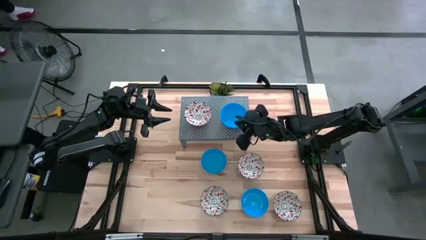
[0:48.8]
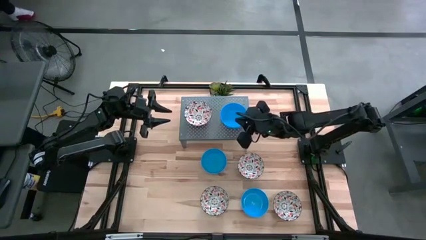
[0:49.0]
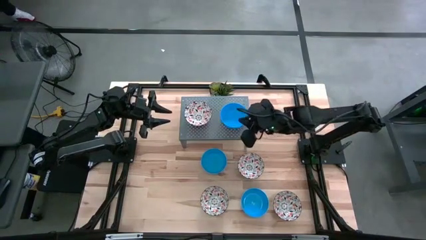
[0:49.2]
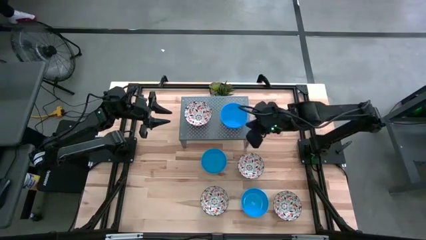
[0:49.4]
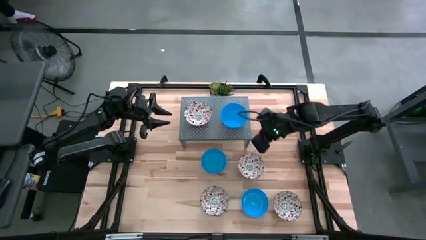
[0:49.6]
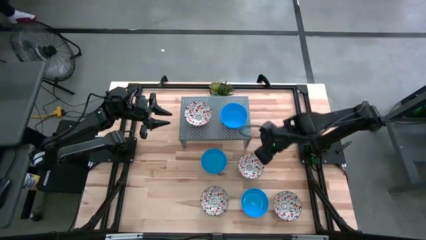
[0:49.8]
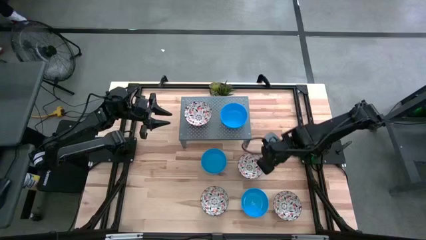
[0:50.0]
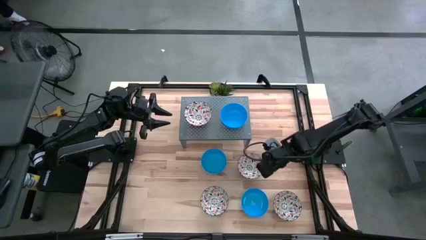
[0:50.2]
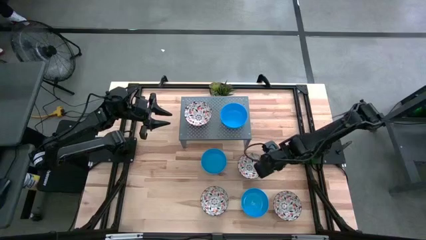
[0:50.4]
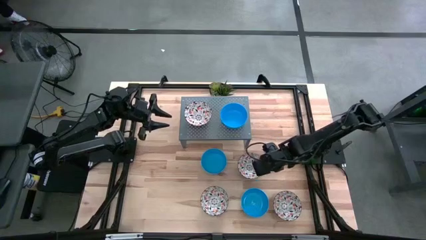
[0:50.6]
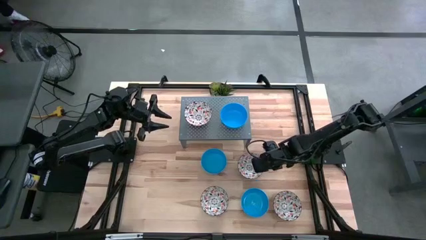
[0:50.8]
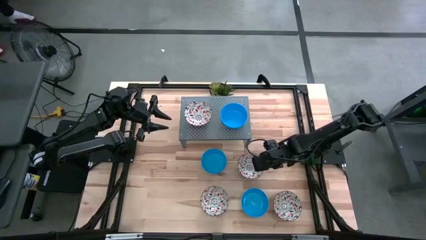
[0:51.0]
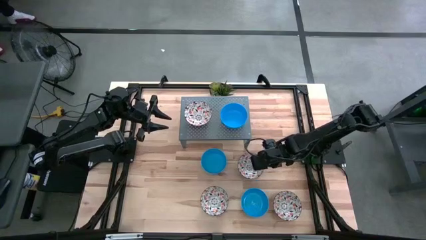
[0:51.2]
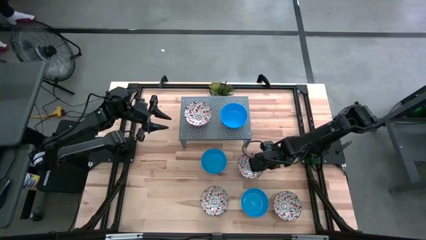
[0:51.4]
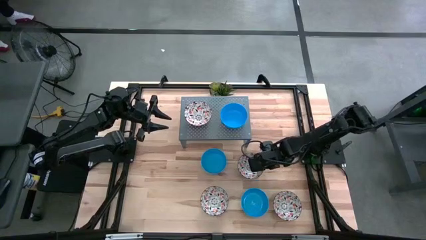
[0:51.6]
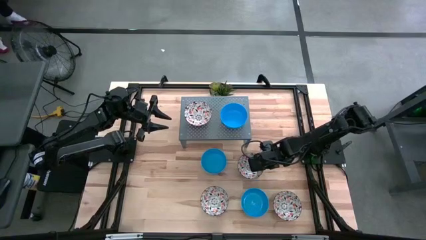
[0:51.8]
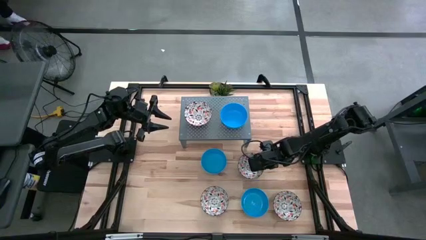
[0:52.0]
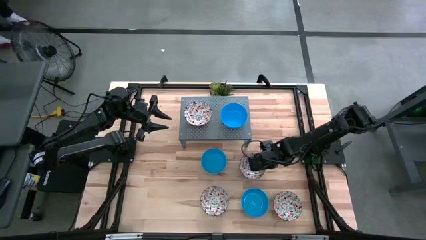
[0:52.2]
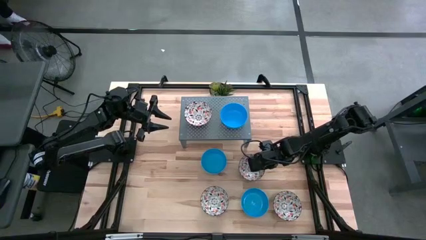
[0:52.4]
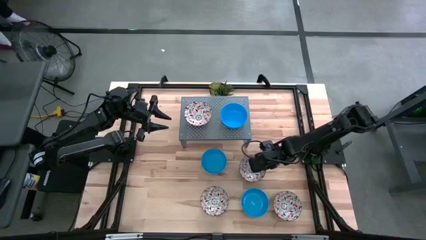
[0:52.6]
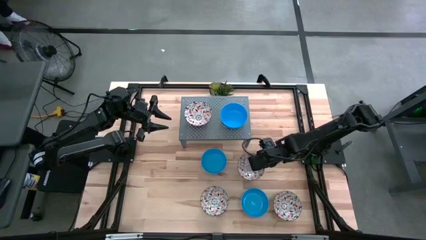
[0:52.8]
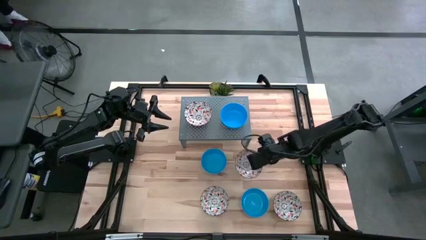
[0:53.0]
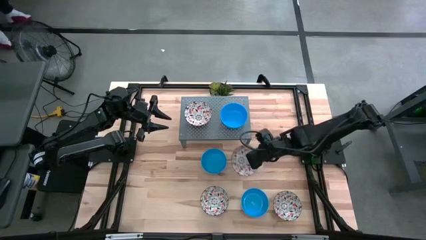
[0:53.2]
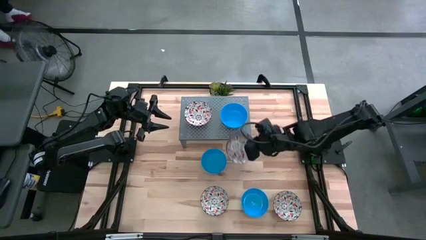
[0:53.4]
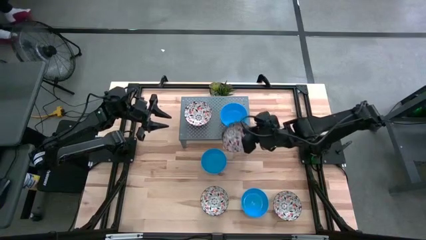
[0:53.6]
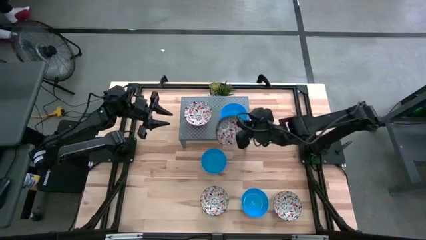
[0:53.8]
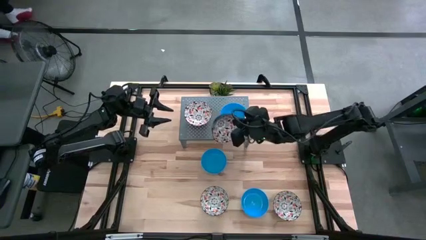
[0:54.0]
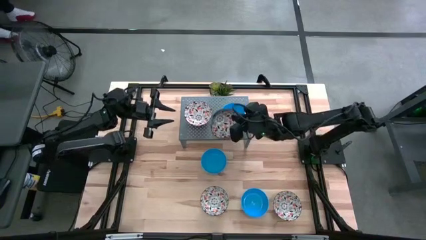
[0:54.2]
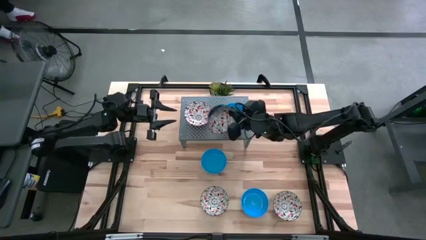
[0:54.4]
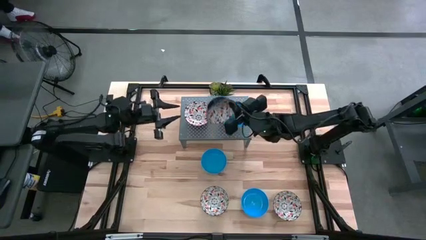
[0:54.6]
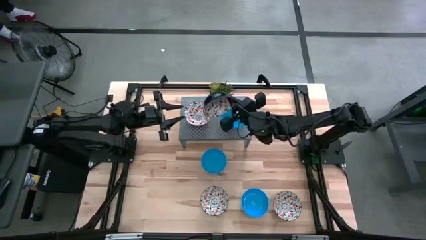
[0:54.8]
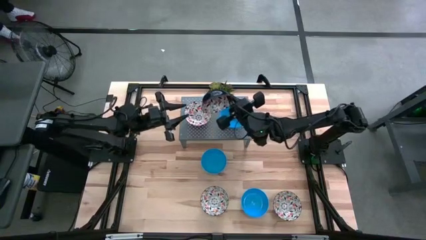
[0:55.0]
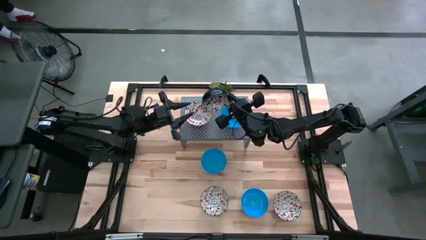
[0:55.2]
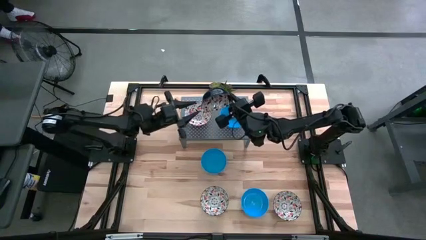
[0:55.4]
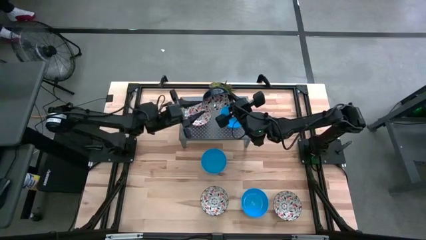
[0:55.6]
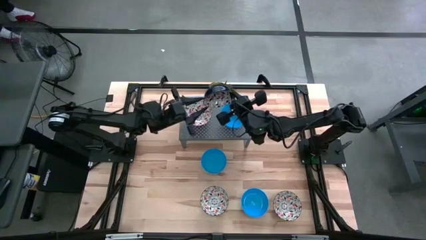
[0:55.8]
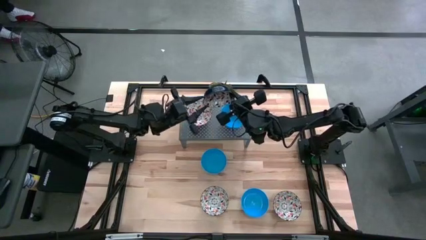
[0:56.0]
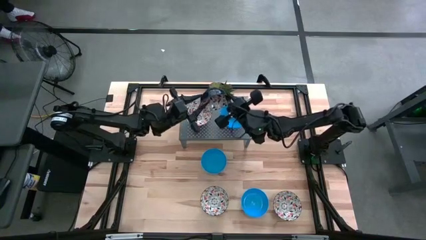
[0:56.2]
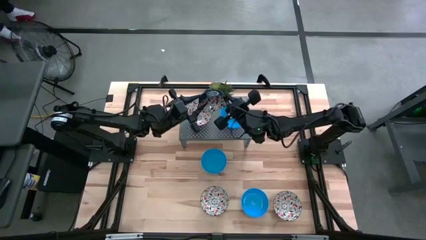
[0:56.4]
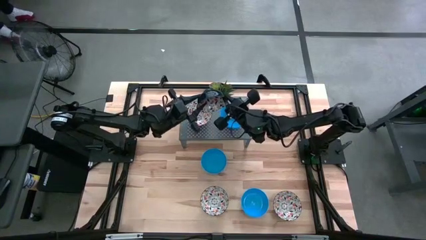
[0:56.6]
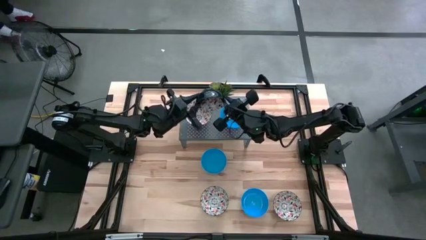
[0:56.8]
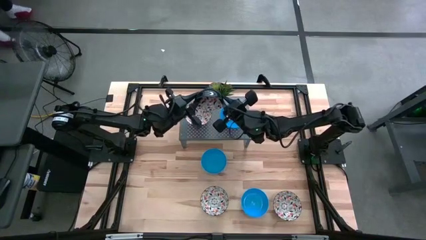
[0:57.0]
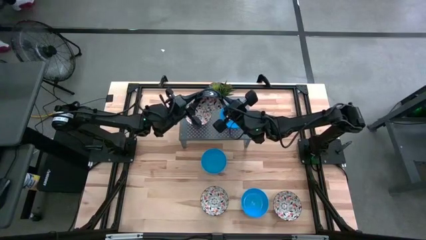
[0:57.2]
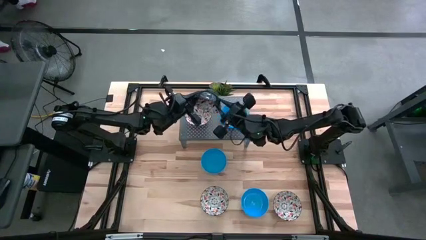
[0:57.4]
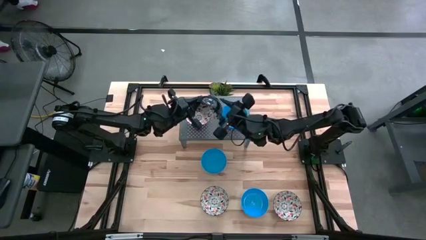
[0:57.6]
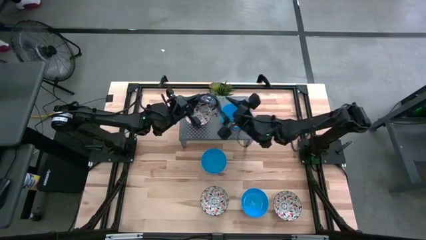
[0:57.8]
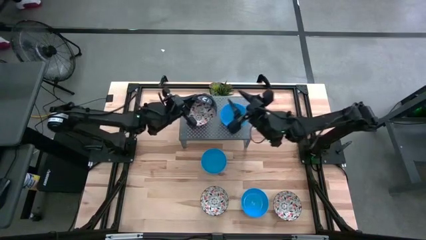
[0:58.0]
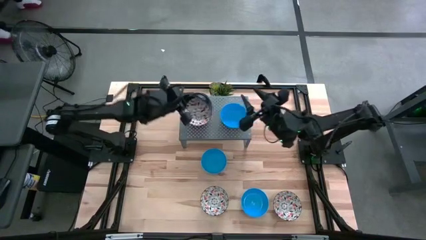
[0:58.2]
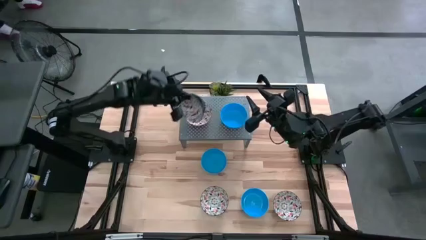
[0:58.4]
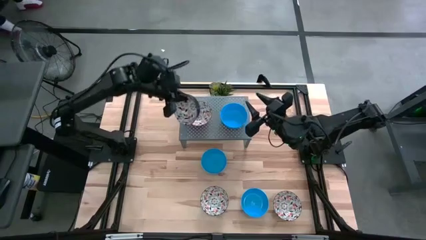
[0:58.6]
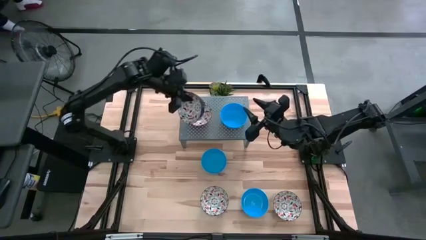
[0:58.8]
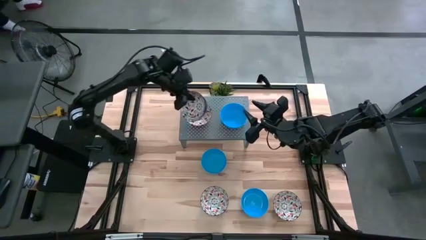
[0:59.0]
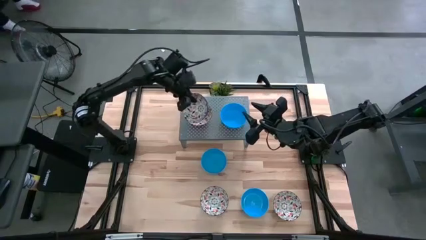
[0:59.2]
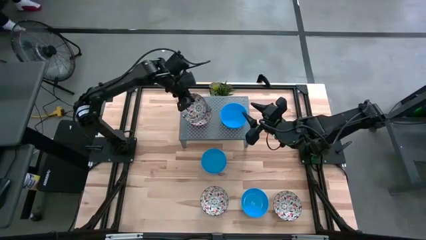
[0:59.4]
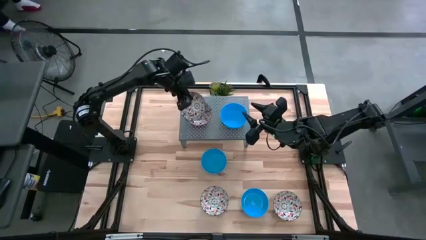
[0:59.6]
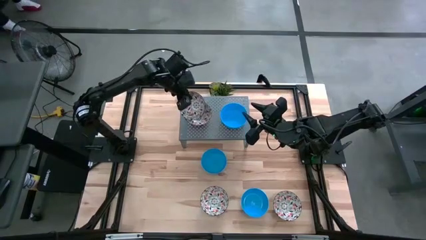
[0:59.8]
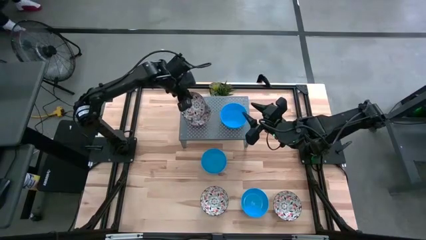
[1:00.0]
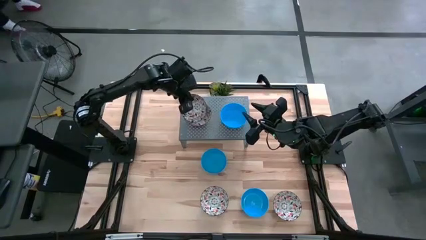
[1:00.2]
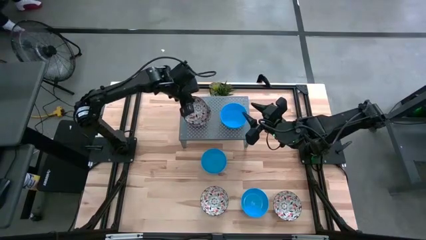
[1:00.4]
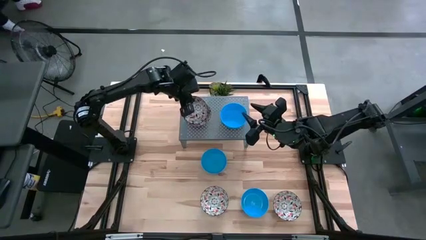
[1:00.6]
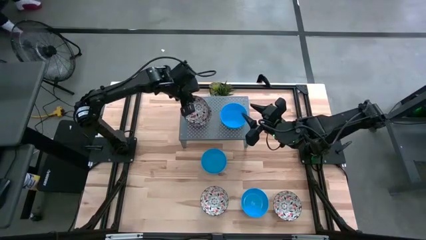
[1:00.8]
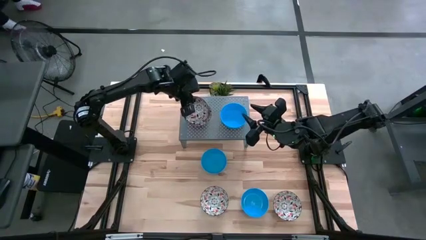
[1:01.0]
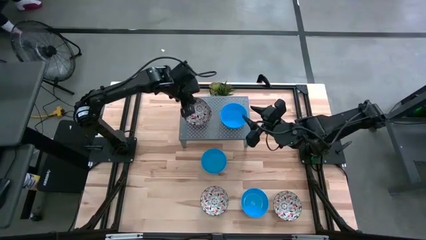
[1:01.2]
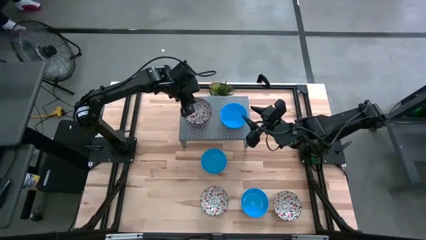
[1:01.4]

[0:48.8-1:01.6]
Task: Pick & Place Mini bowls
Stack the white patterned bowl on the white patterned bowl on the shelf
